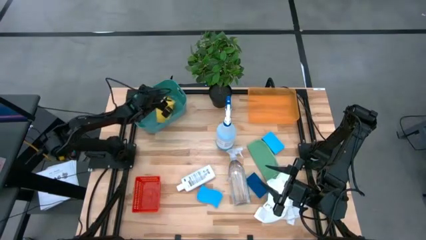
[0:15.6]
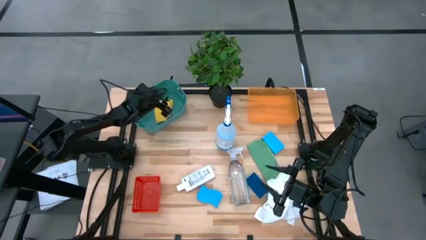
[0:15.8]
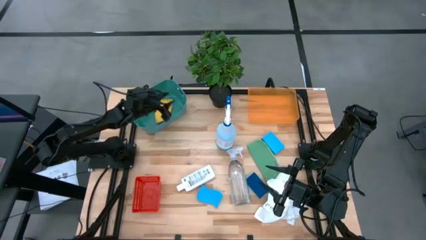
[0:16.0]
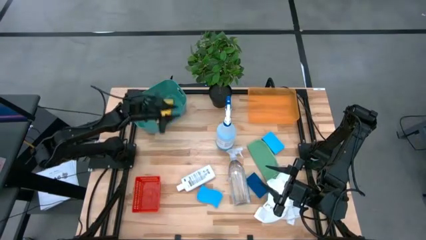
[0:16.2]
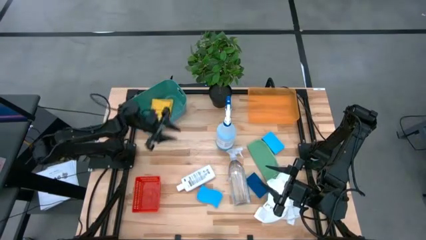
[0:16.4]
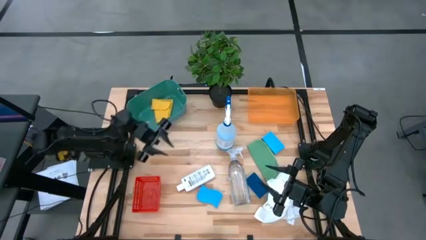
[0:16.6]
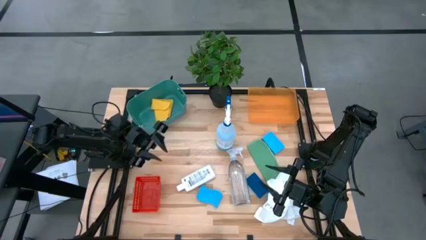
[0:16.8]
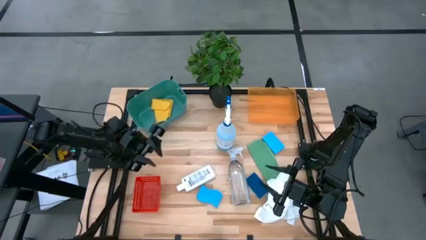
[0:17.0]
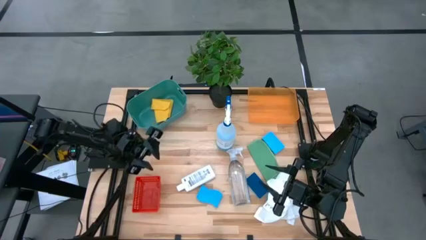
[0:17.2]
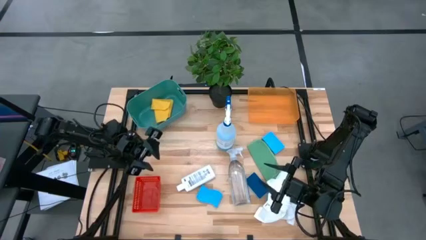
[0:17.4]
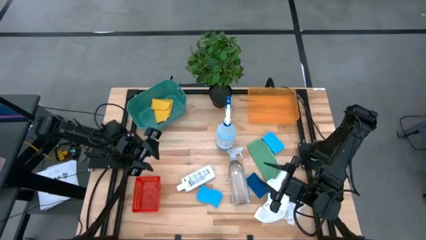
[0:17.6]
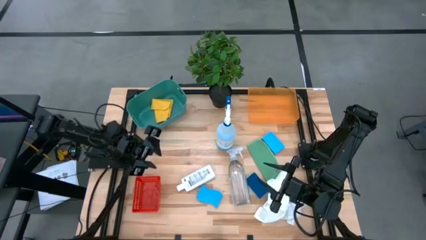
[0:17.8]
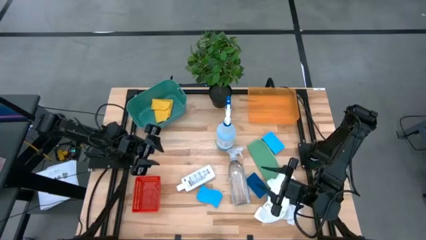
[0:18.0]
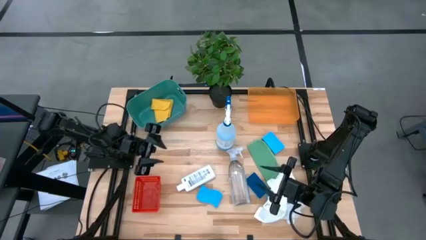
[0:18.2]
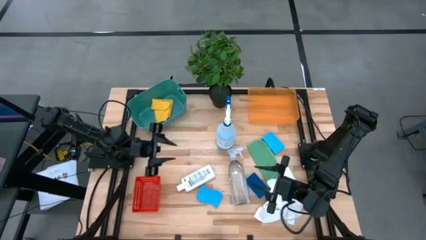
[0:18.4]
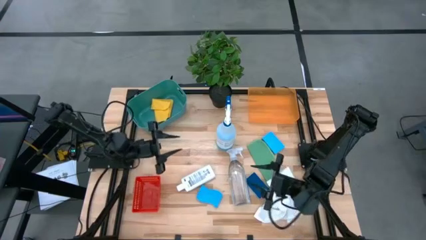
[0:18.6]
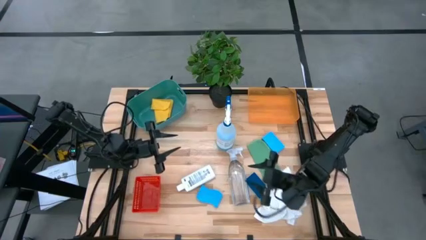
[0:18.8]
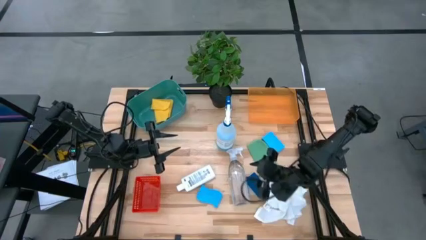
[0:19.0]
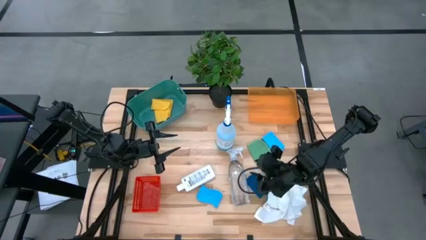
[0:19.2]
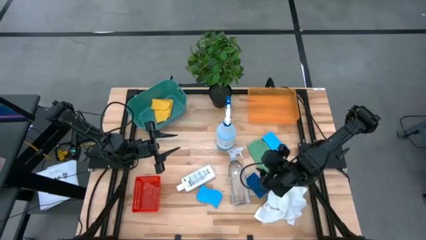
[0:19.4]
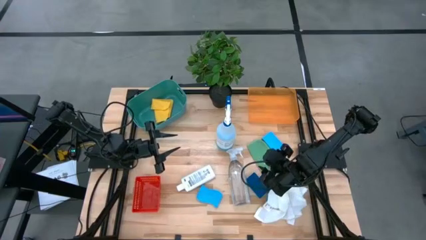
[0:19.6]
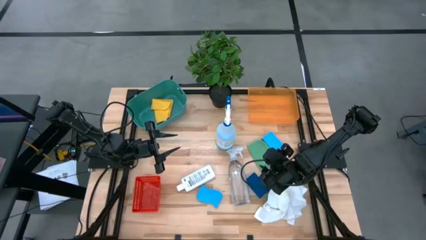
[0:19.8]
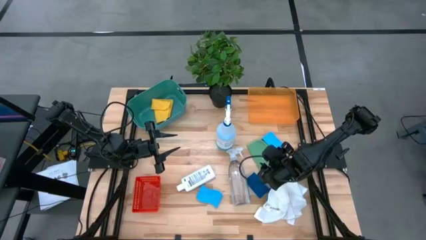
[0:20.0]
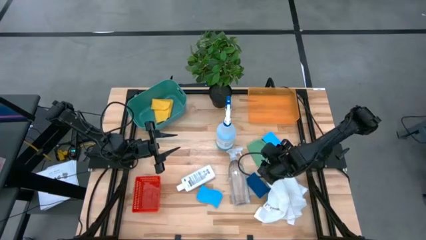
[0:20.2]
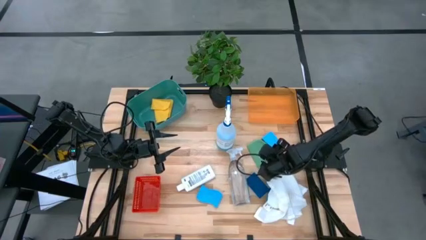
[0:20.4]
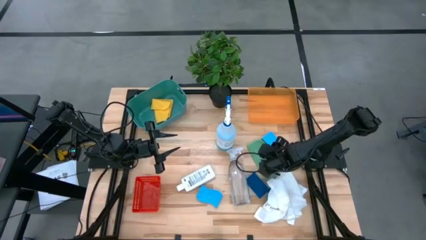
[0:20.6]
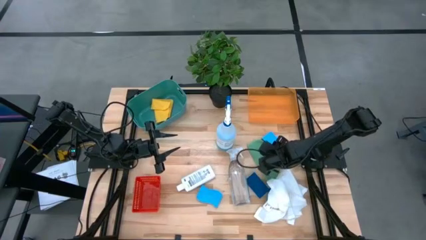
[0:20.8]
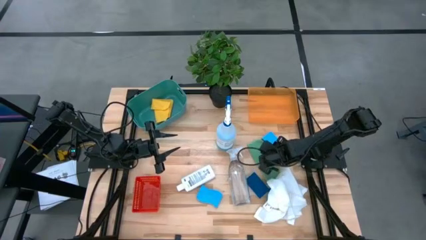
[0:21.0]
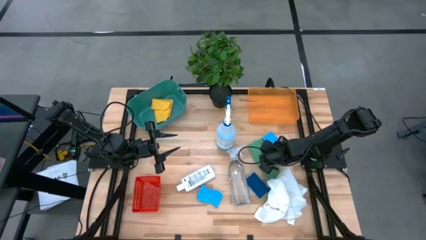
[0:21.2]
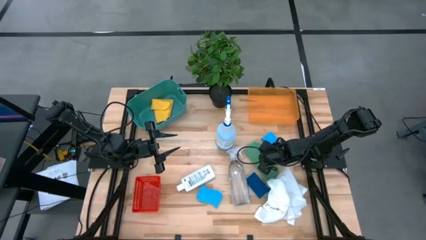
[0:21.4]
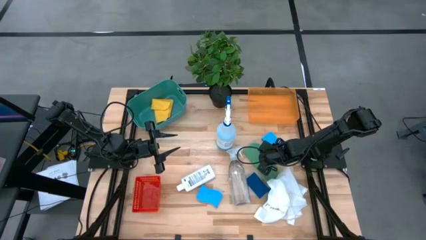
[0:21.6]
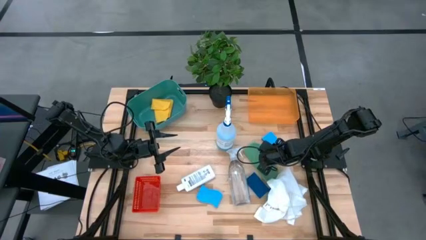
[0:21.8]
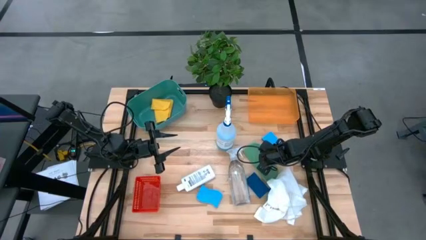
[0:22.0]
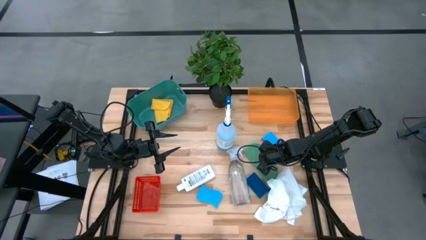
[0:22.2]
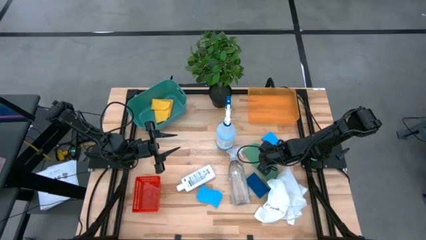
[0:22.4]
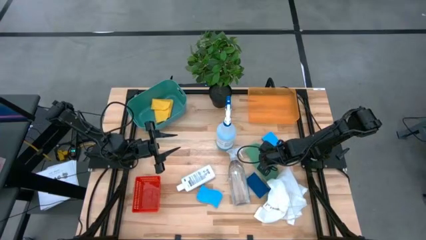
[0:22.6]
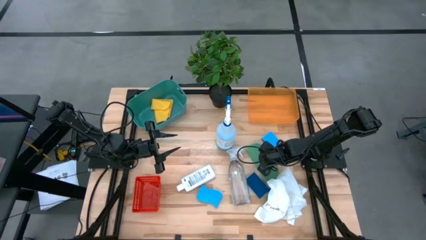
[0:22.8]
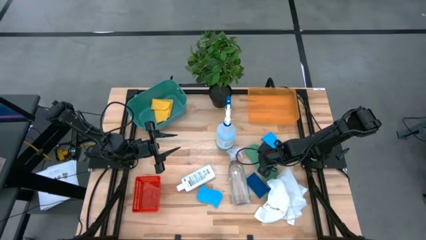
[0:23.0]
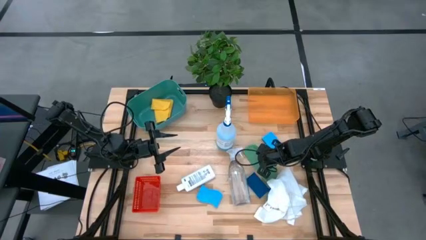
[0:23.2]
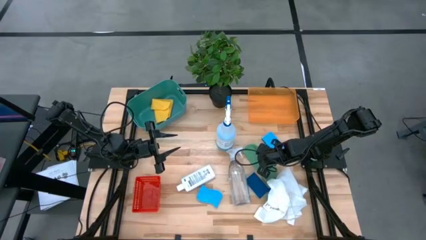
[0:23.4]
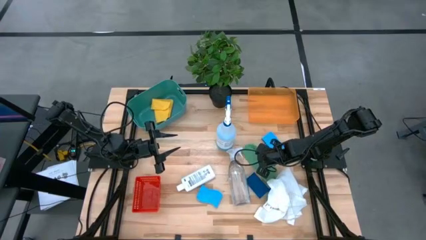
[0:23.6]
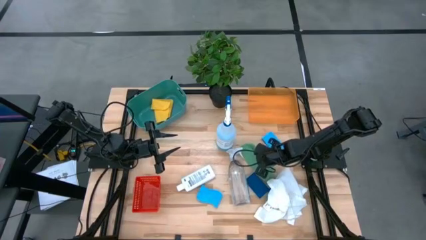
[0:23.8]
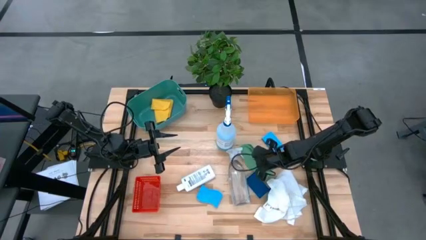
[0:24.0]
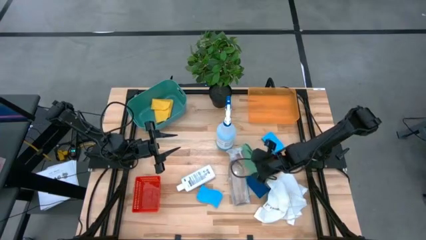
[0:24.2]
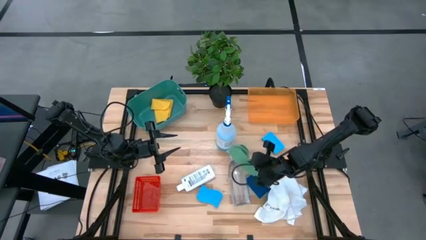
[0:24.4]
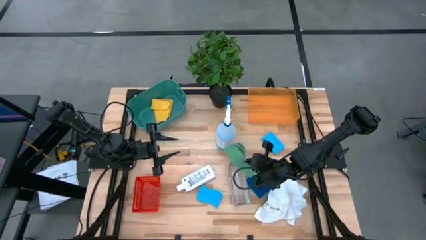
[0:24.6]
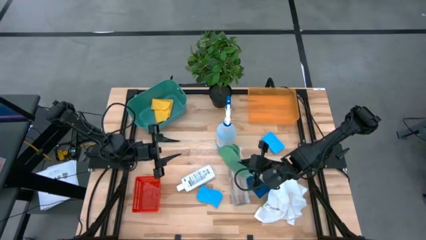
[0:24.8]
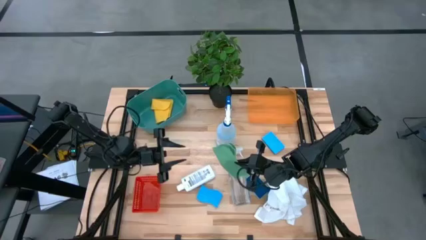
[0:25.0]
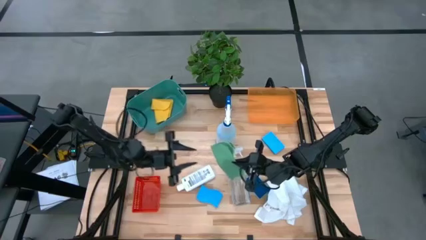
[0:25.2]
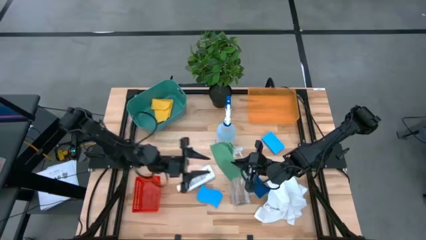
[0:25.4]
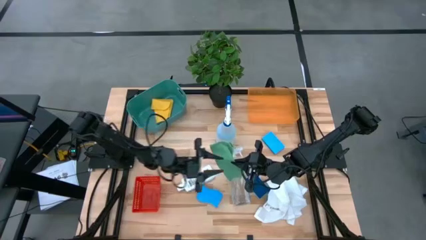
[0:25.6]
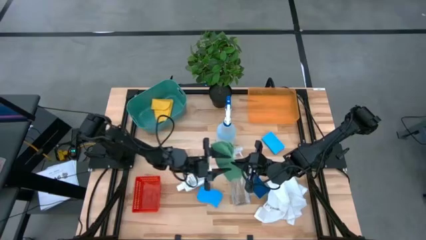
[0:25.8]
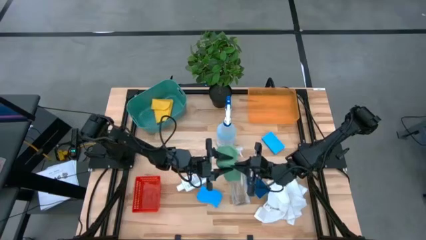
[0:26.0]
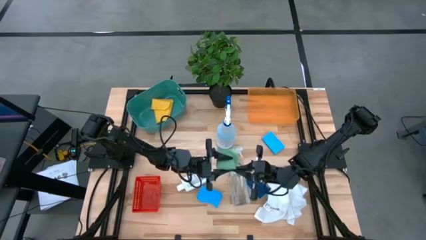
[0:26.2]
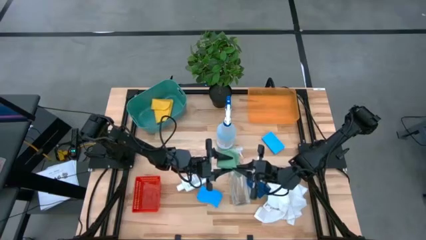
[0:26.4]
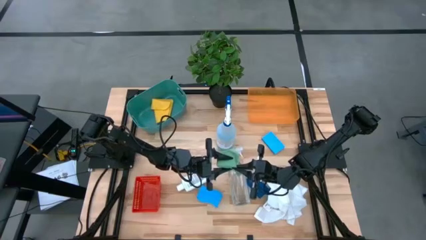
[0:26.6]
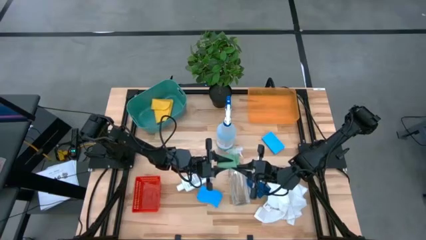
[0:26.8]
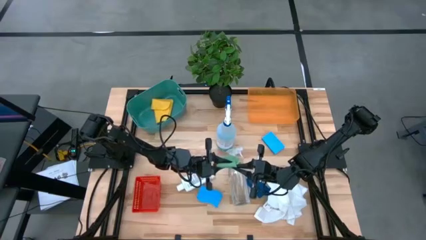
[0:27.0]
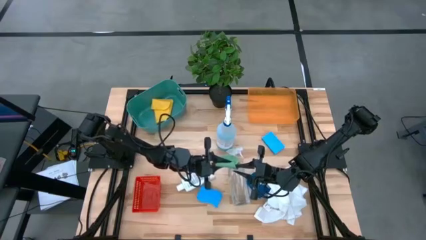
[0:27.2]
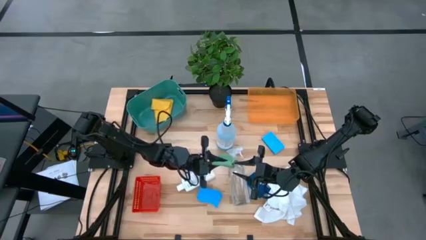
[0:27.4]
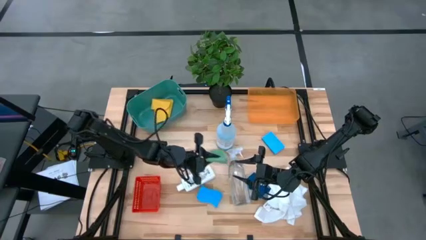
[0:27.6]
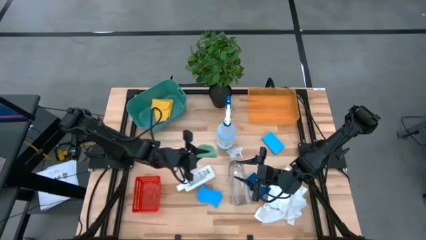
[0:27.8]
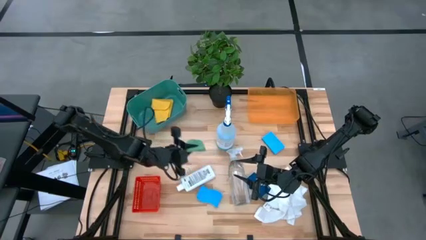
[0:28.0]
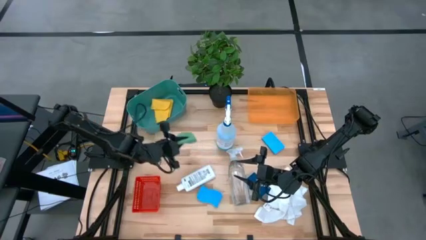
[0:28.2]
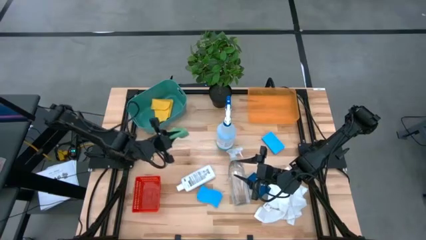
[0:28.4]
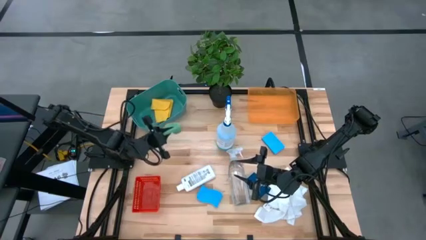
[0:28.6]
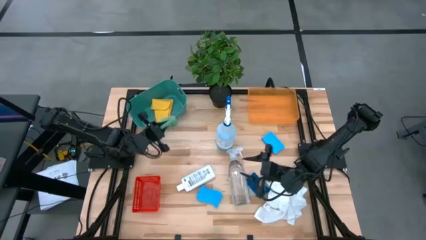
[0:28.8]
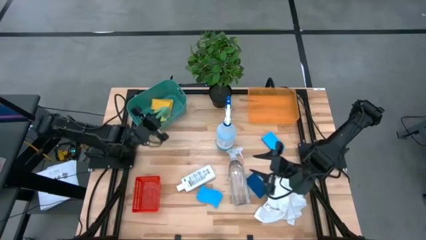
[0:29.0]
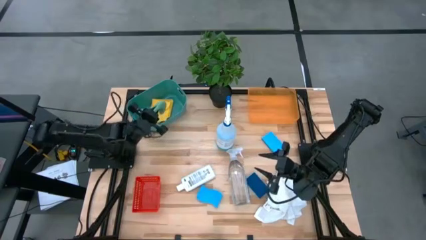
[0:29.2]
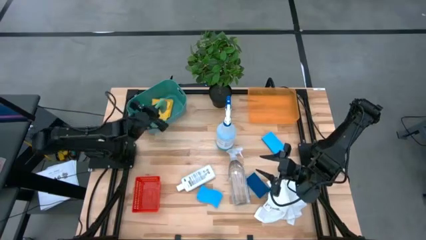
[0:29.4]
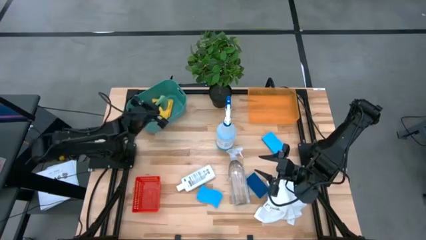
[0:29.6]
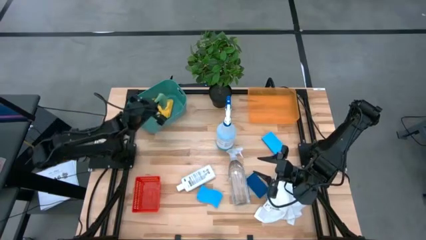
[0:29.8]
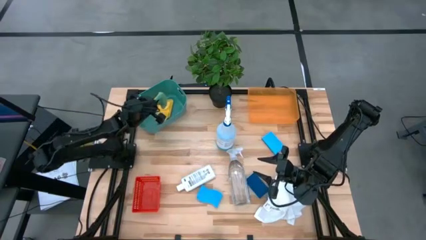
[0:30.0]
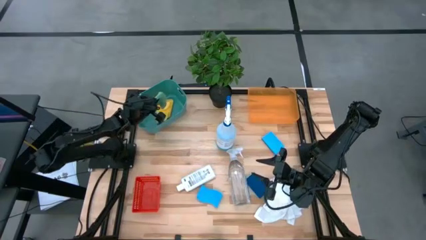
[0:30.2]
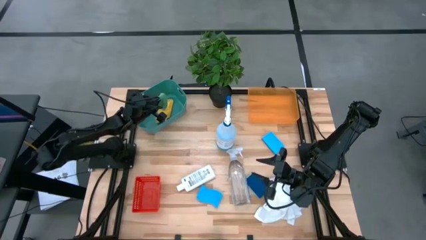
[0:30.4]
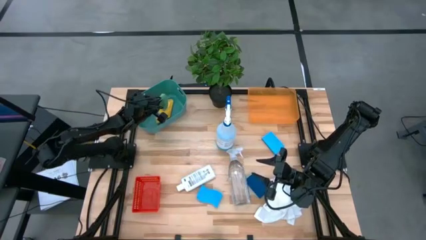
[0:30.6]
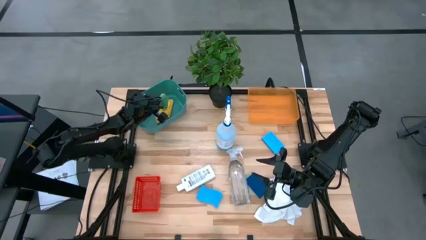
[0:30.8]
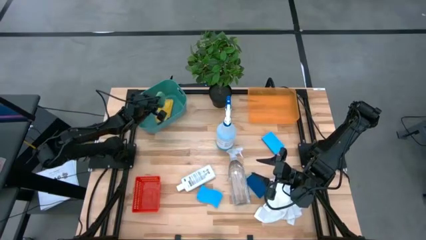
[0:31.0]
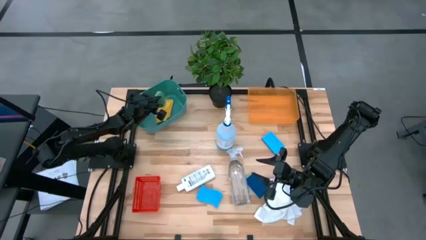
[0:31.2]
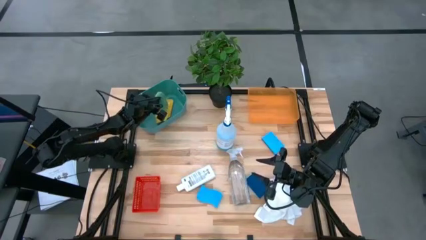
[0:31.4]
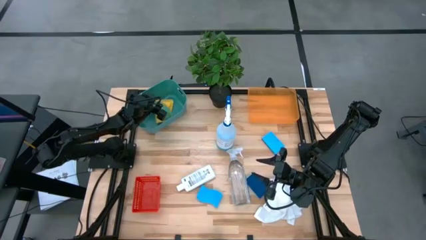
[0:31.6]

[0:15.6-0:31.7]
Task: Pick & Place Kitchen Items
Put the green towel into the green bin
